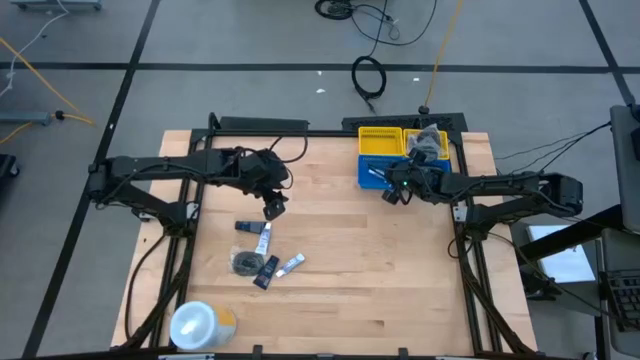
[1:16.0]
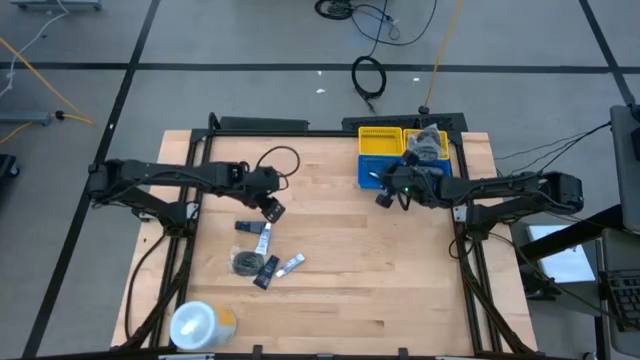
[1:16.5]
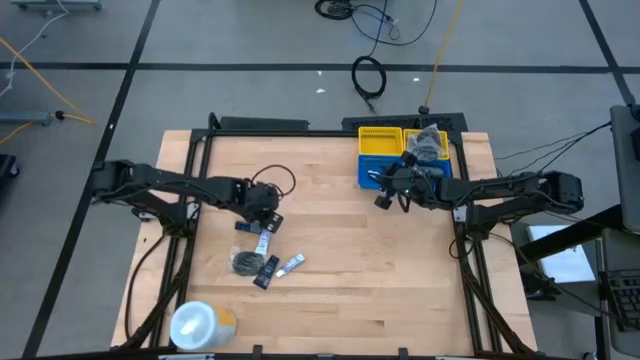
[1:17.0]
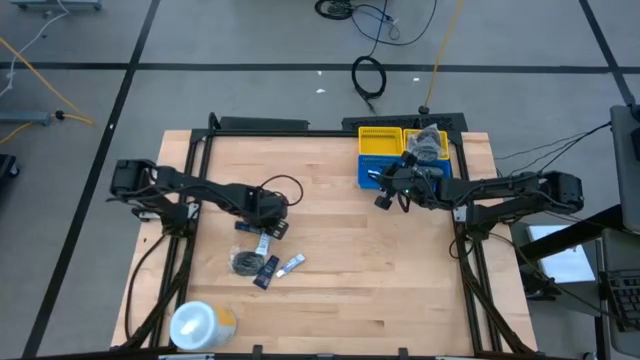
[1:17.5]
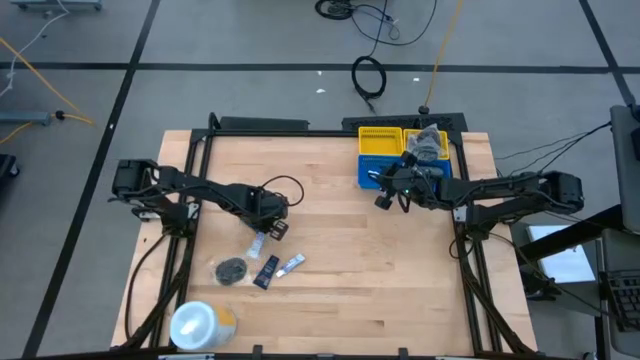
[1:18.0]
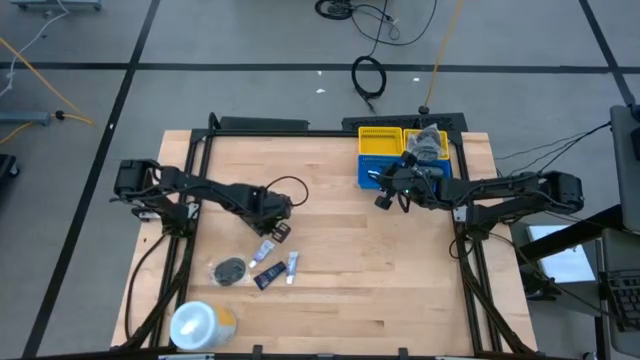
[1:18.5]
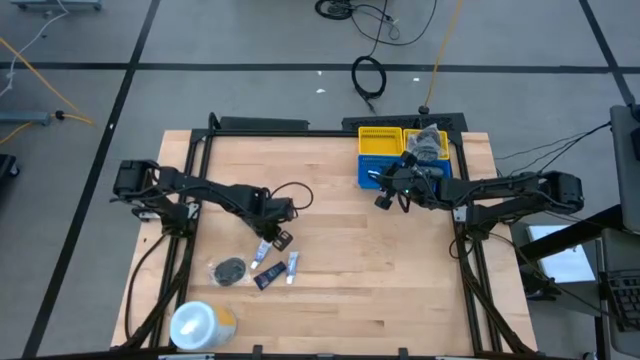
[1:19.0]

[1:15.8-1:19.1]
Task: Pick & Place Travel size toiletries
Put the white toothpaste into the left blue basket

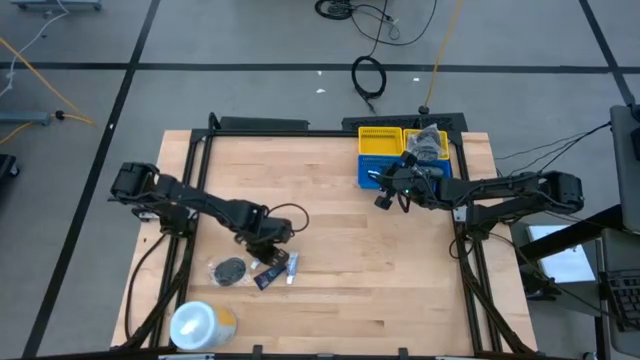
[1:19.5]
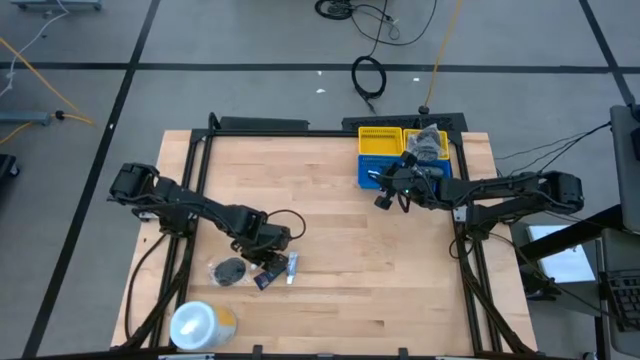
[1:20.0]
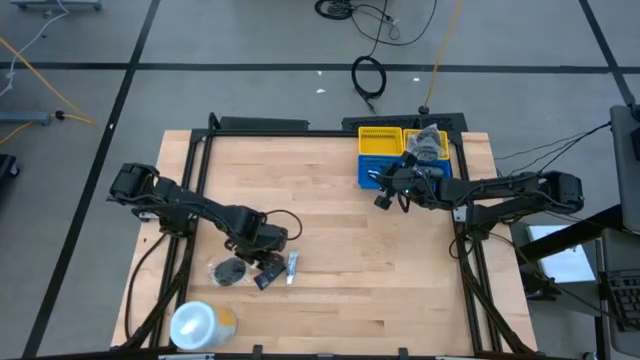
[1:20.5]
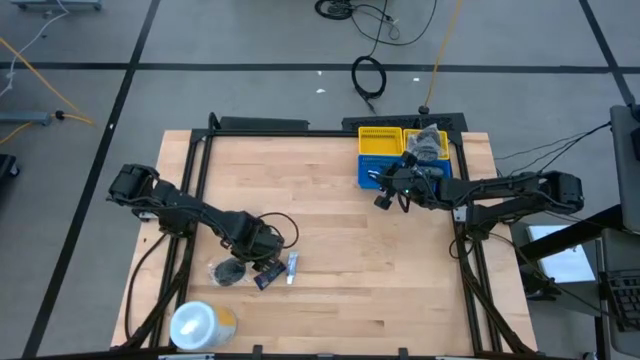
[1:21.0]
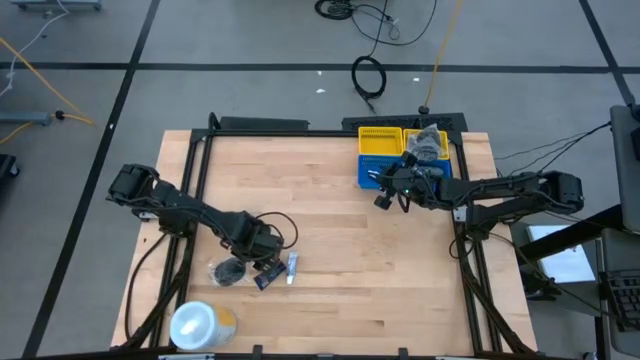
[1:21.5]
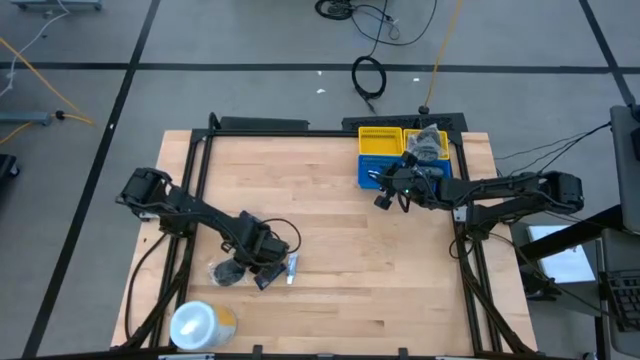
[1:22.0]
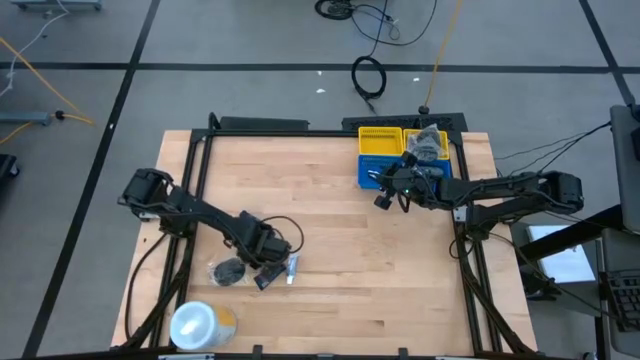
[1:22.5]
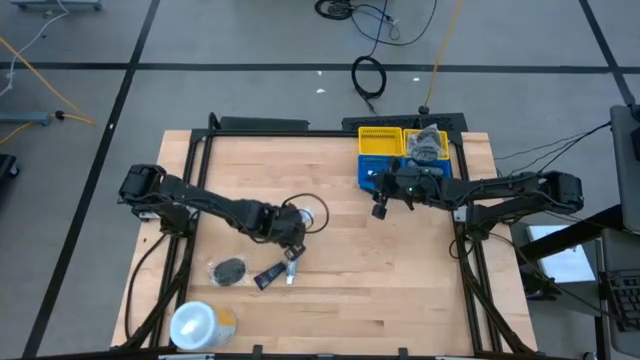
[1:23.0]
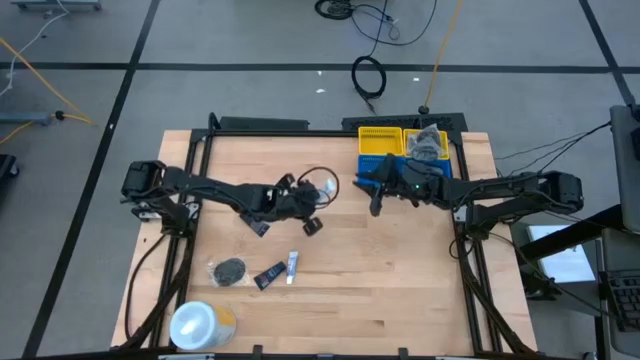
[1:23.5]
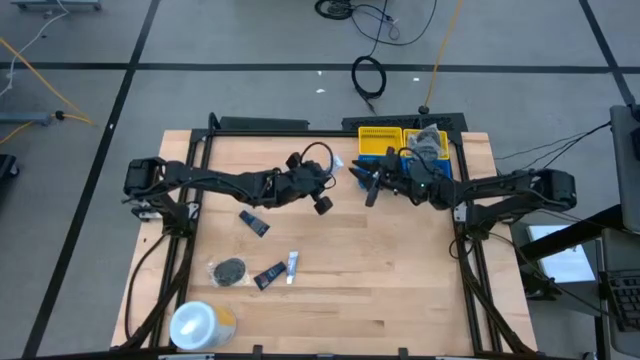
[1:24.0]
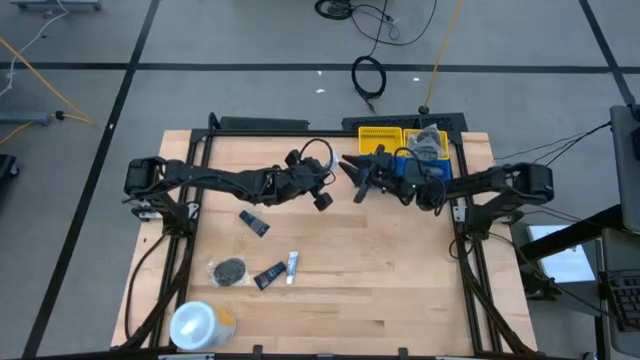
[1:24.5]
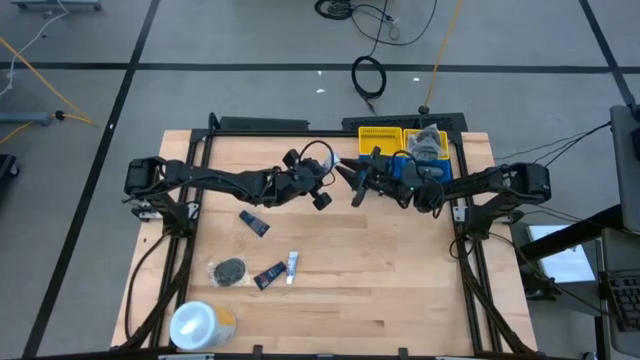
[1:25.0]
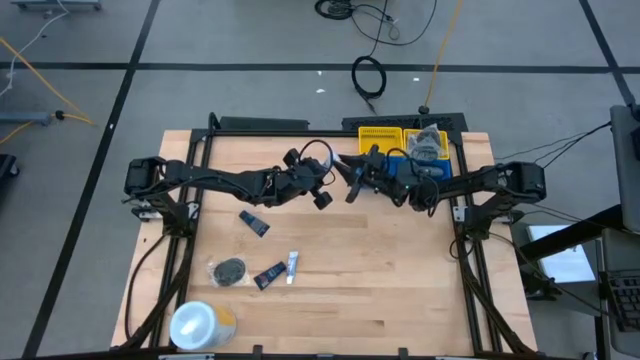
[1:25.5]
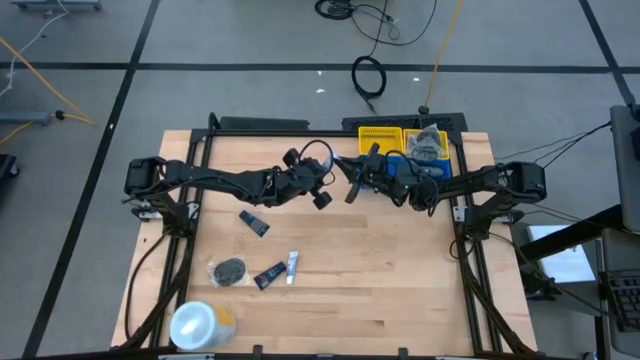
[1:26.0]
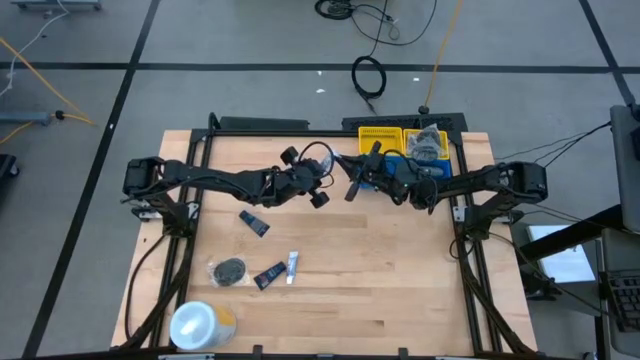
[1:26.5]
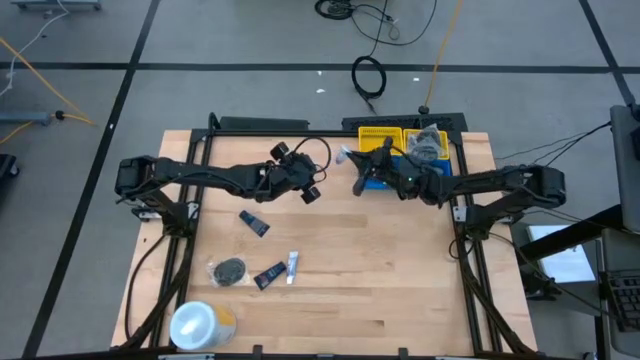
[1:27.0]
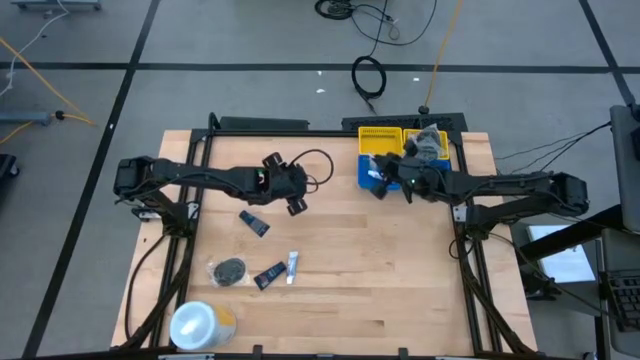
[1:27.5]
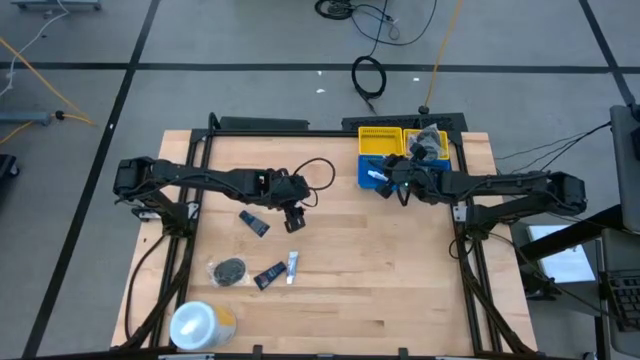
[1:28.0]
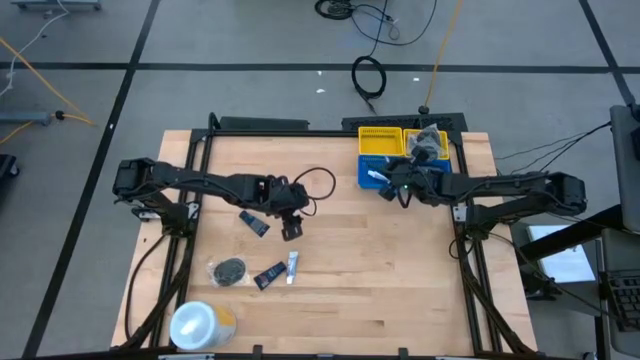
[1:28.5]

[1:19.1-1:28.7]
Put the white toothpaste into the left blue basket

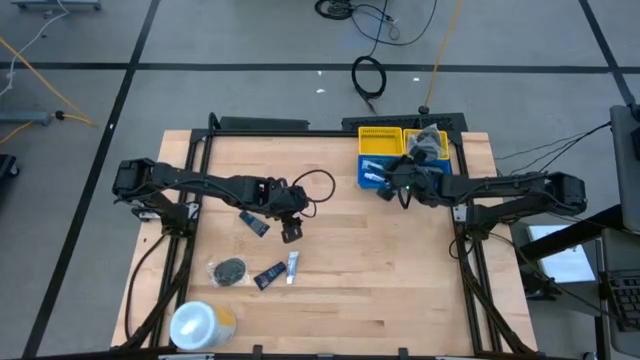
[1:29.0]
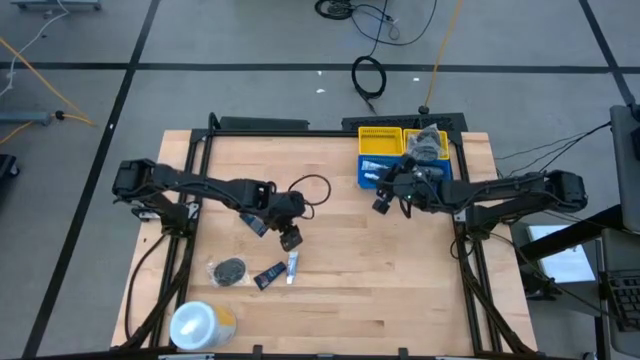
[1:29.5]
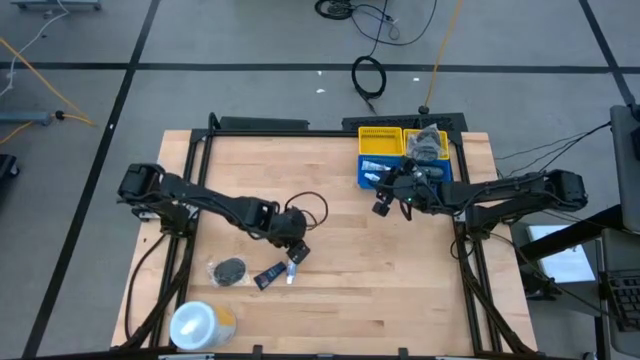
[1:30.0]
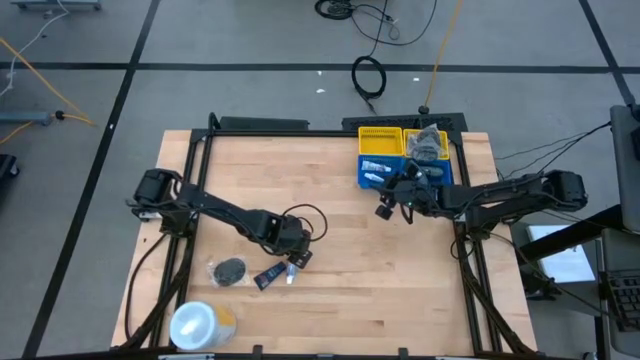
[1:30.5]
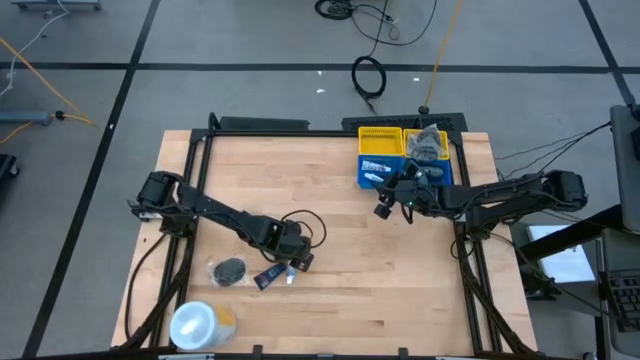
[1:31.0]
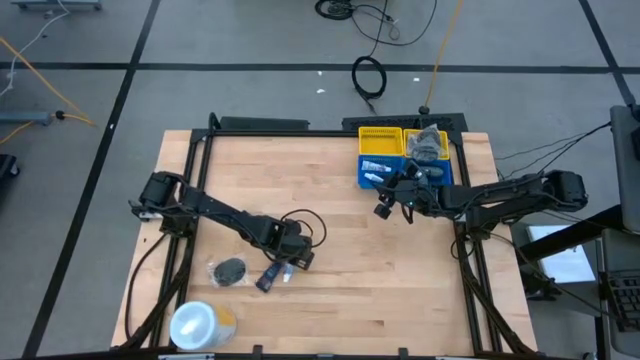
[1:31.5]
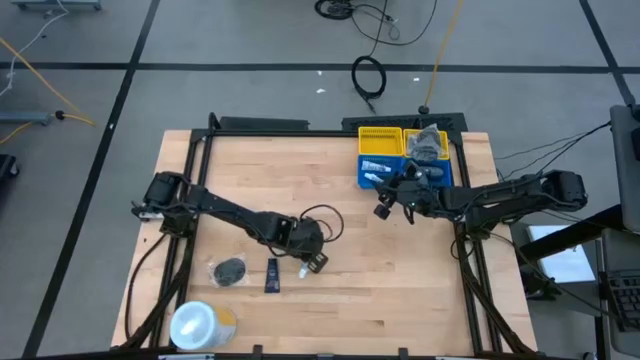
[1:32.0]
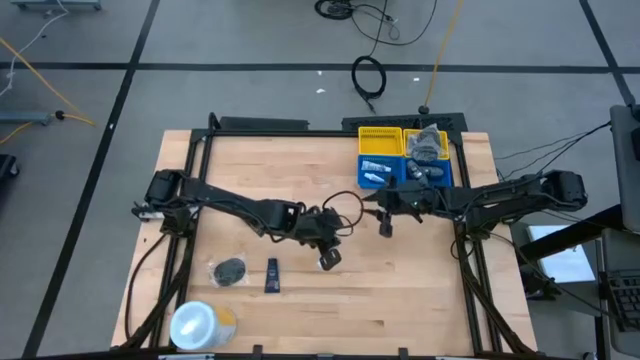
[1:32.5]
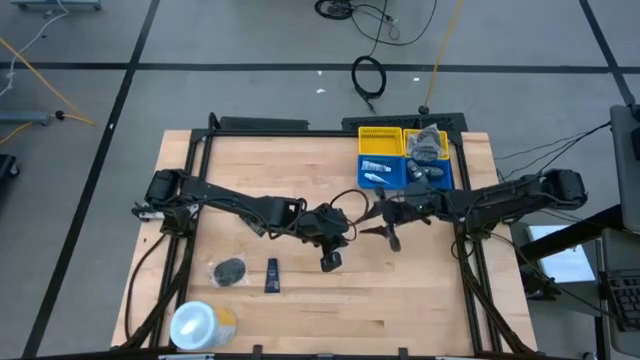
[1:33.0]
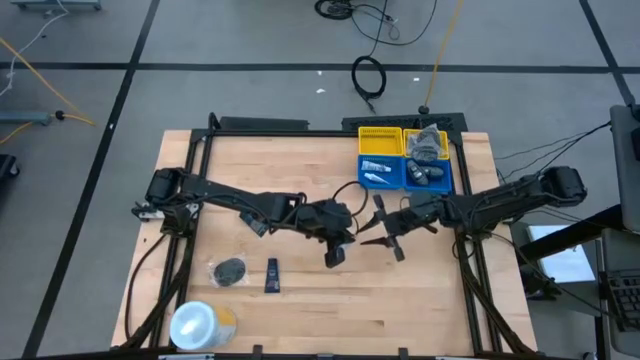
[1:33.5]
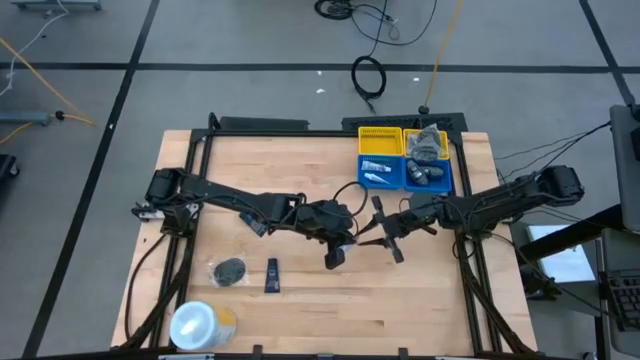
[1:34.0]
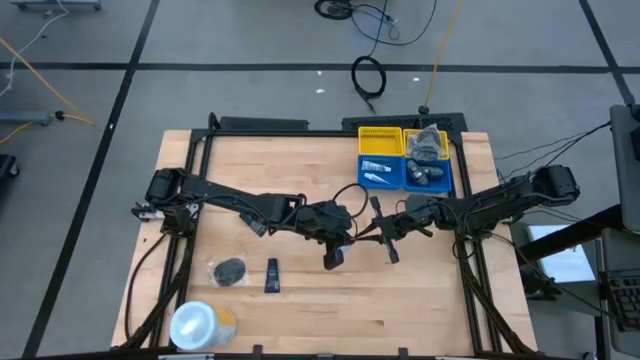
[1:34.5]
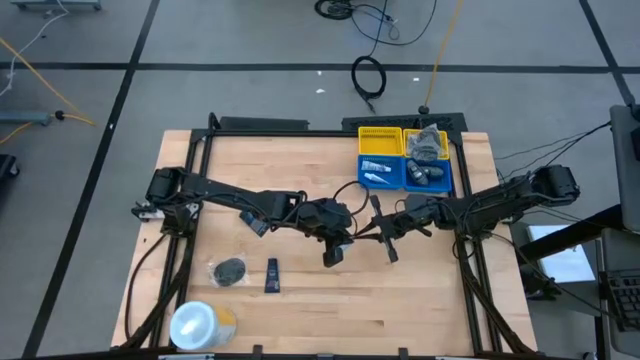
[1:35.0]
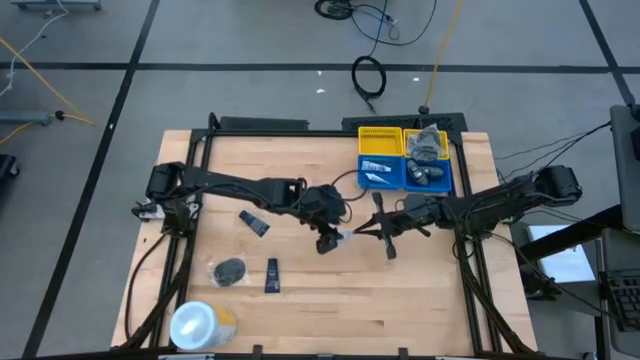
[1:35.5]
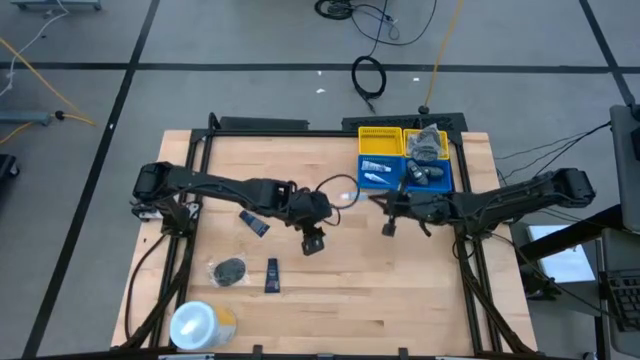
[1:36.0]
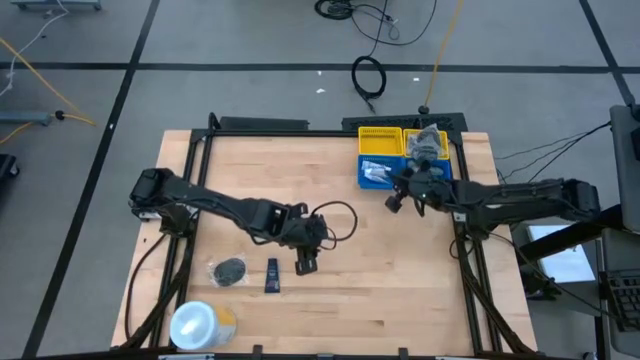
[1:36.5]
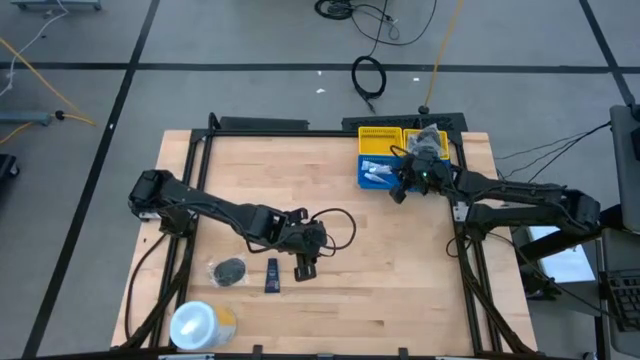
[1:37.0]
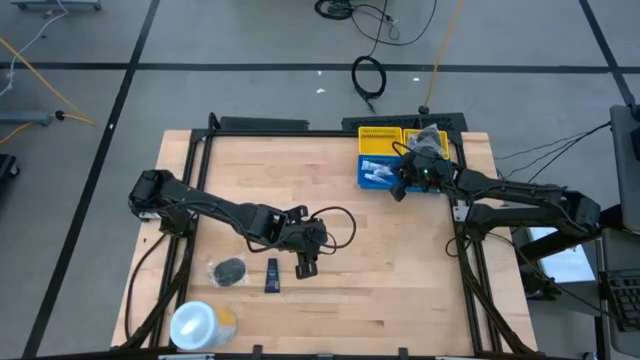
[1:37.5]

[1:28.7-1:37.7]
Put the white toothpaste into the left blue basket
